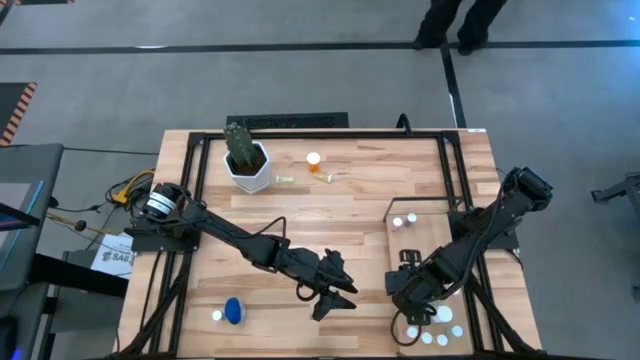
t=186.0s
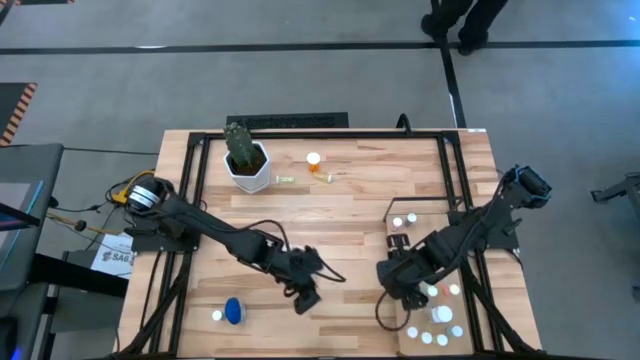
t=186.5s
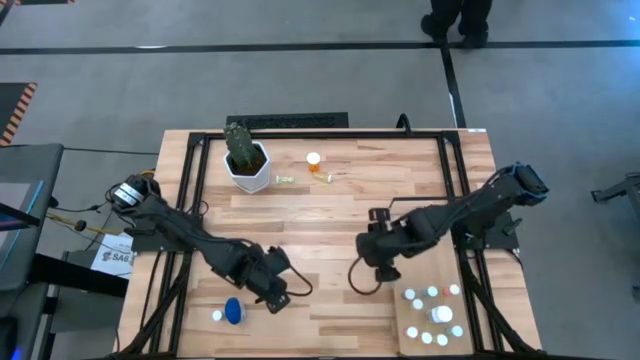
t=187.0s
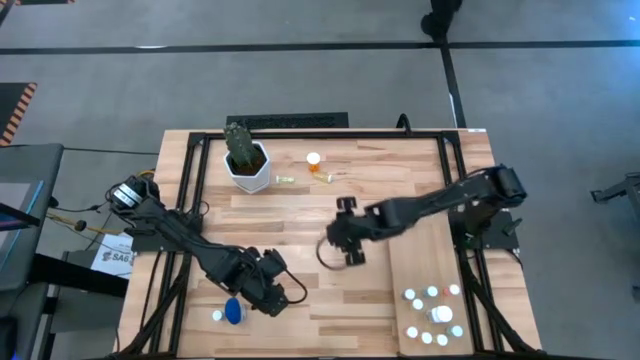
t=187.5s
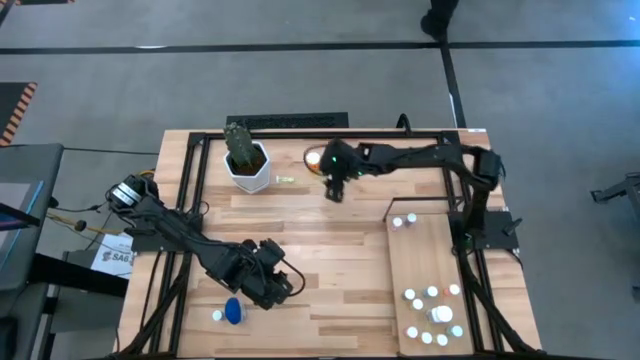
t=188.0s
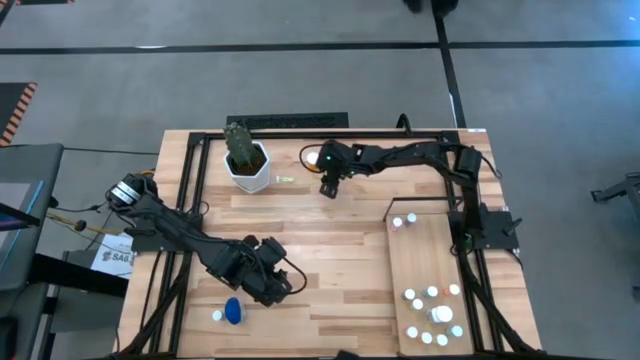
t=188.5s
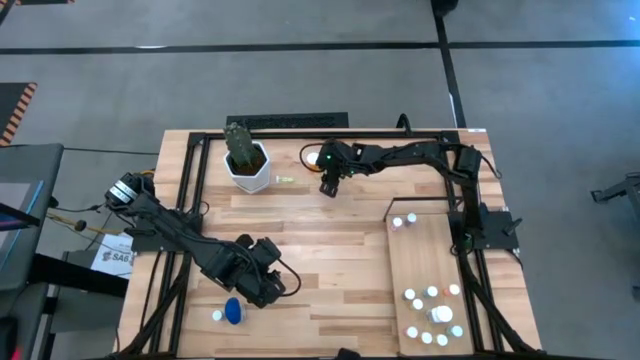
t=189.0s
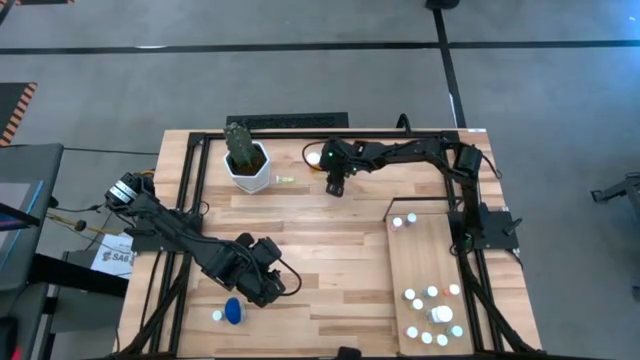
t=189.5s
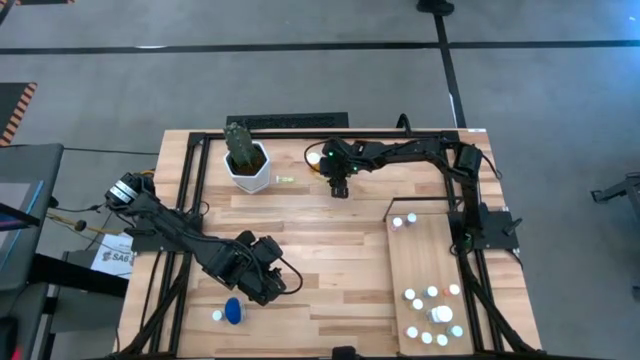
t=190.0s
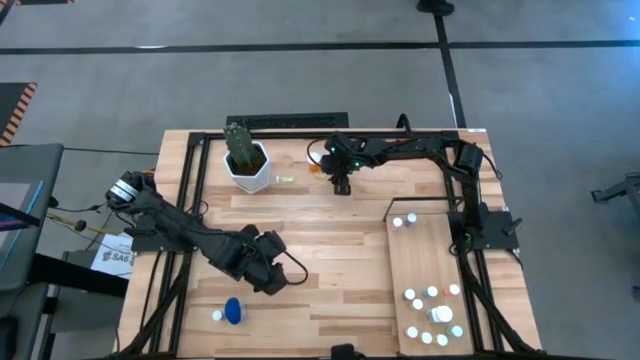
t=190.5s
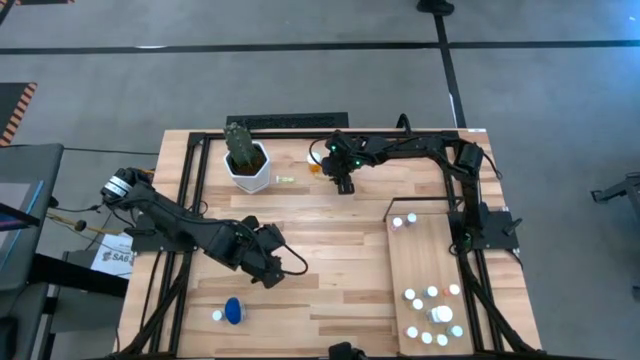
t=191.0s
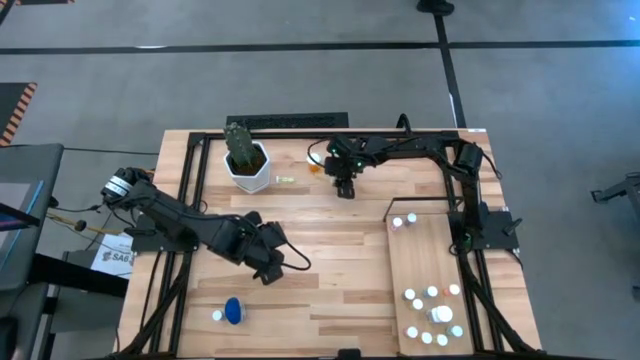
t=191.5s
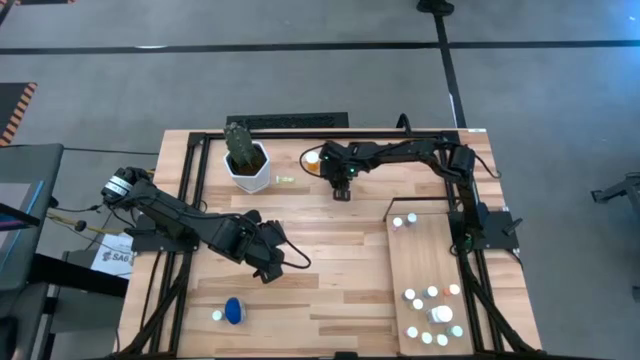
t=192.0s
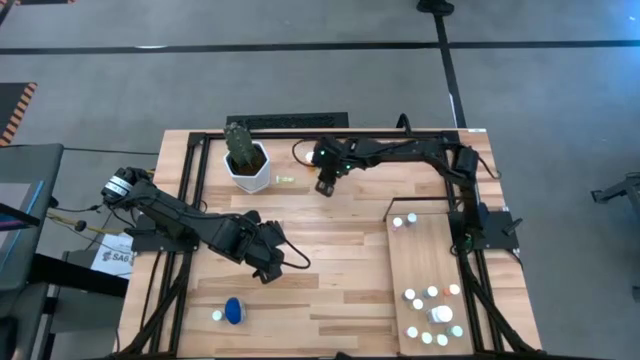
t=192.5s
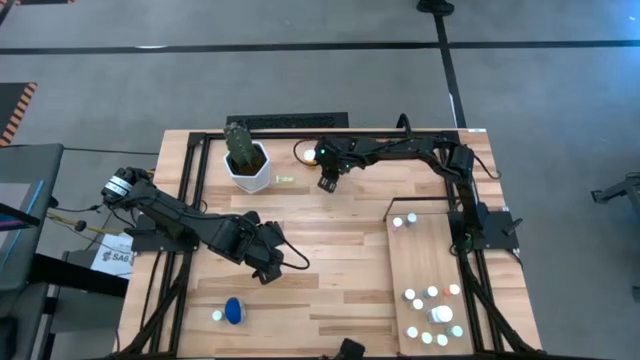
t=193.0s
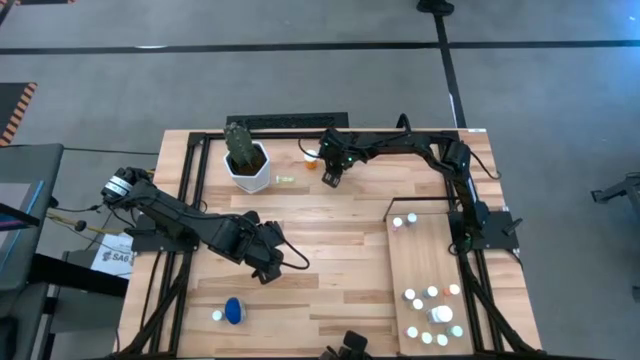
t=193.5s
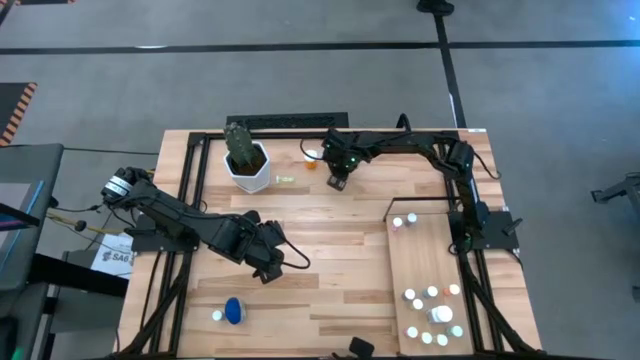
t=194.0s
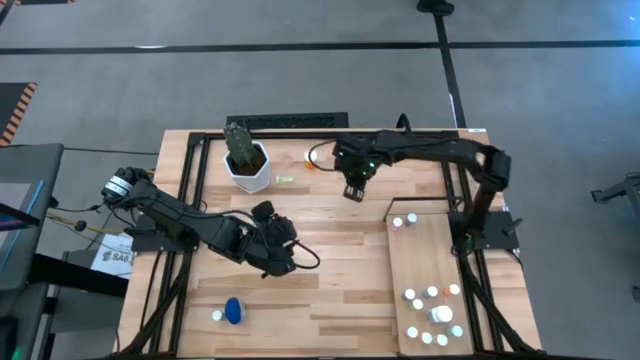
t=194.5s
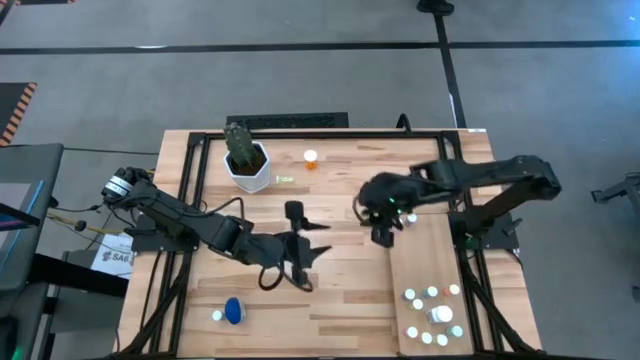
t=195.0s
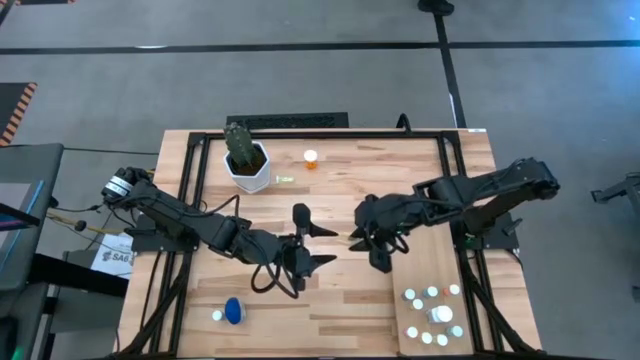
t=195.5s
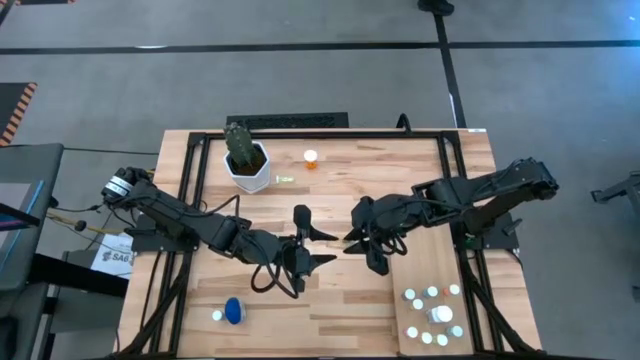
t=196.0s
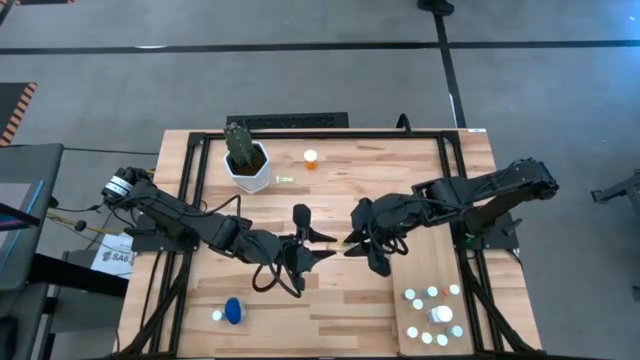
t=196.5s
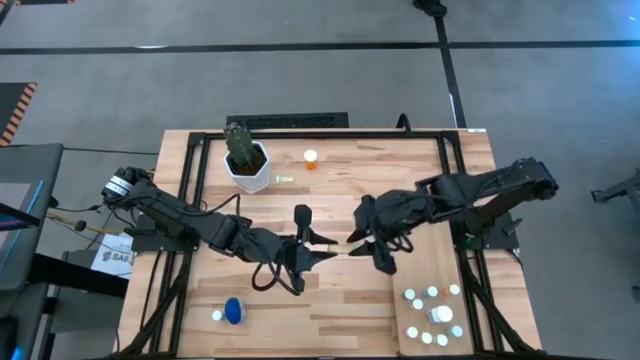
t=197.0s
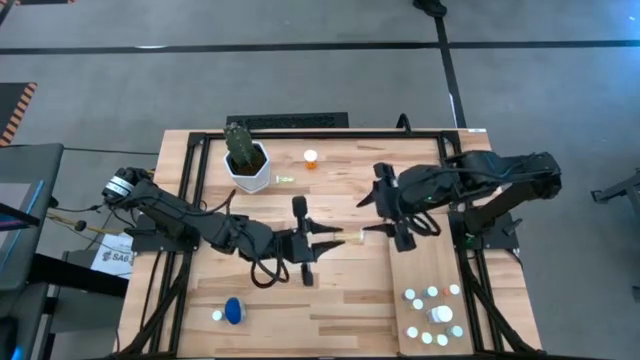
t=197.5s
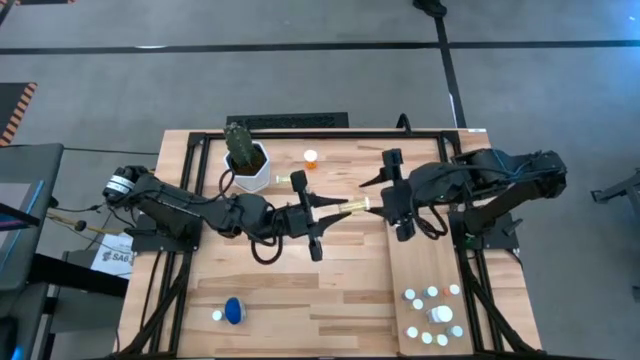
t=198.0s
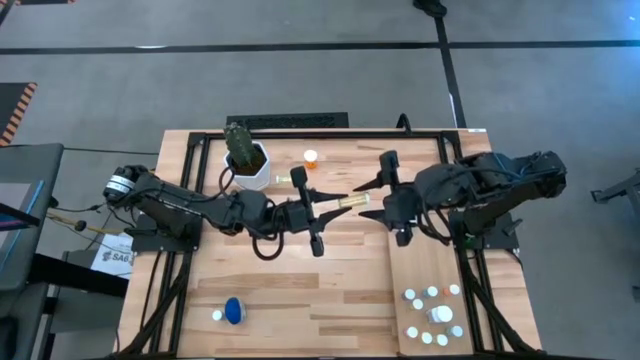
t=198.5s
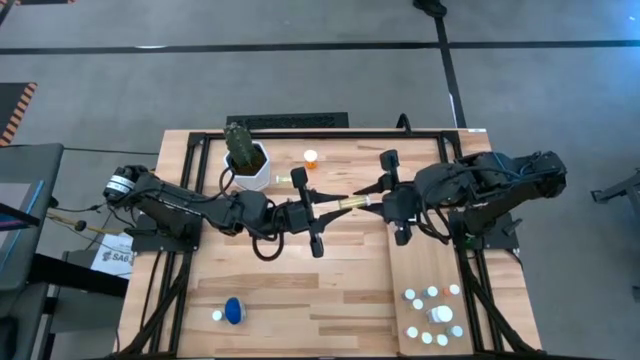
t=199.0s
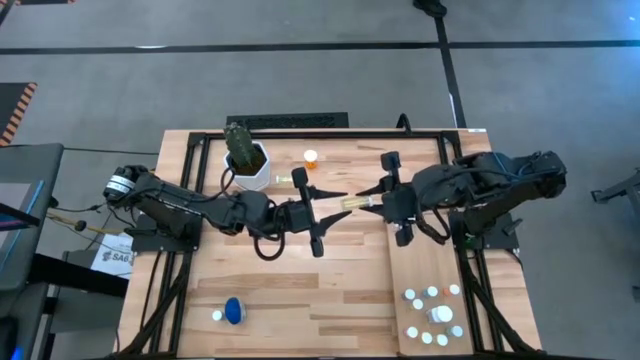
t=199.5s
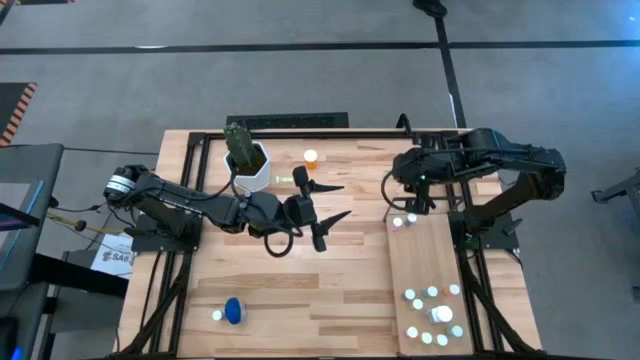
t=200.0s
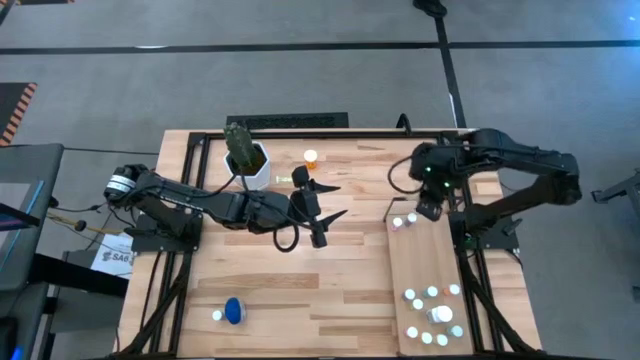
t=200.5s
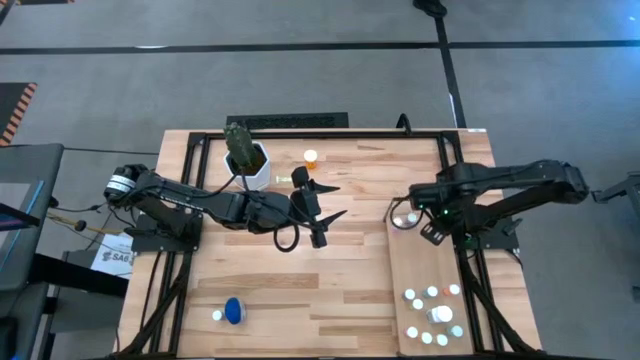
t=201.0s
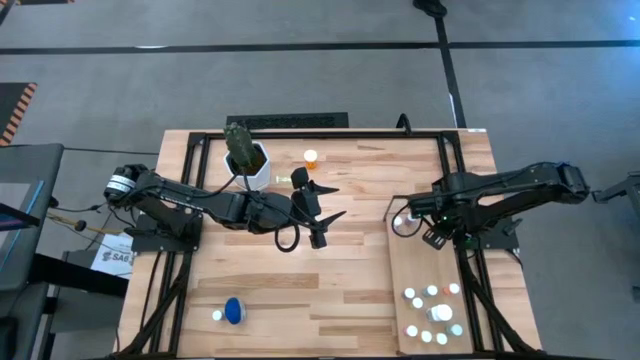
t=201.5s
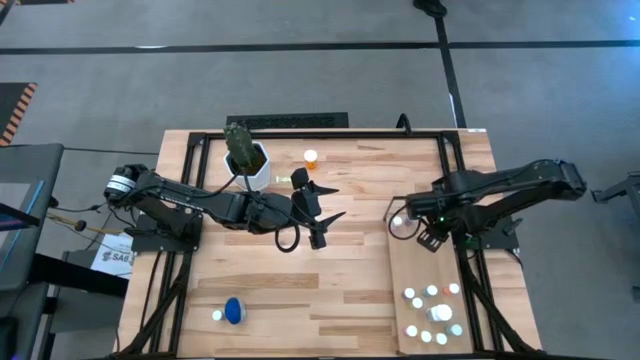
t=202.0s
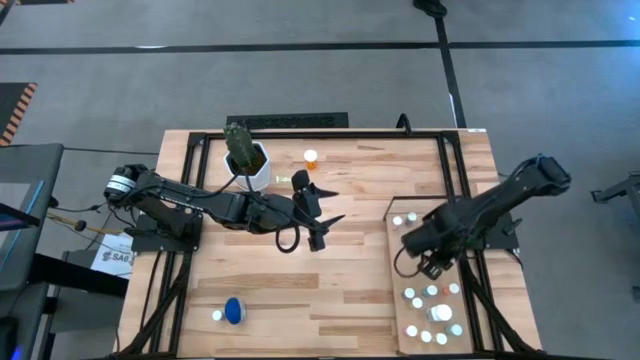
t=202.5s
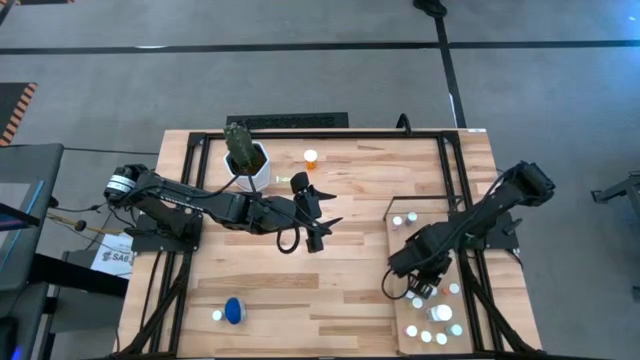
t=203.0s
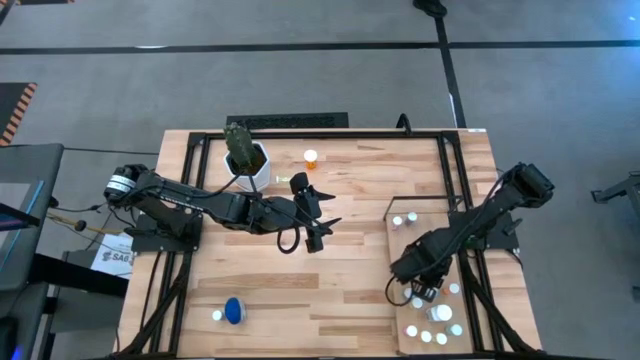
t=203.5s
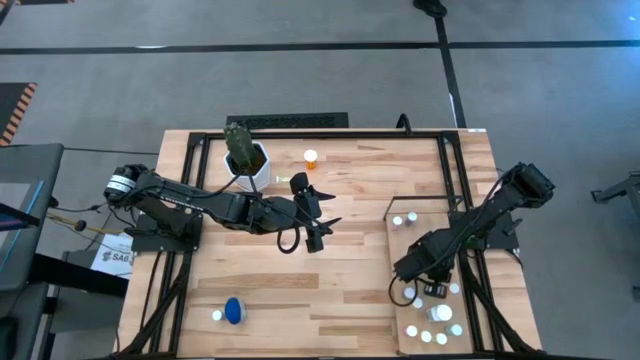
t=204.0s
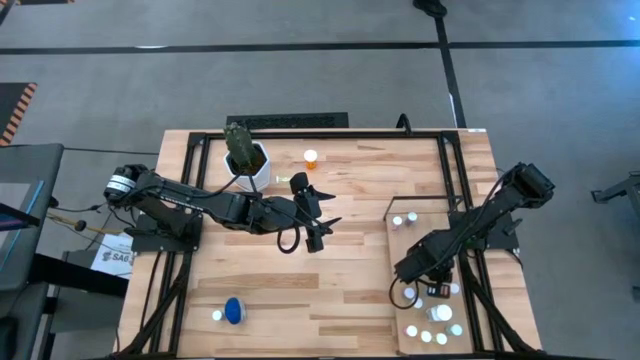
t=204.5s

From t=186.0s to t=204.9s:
Task: Pick and place medicine bottles onto shelf by color
Put the yellow pill bottle on the shelf

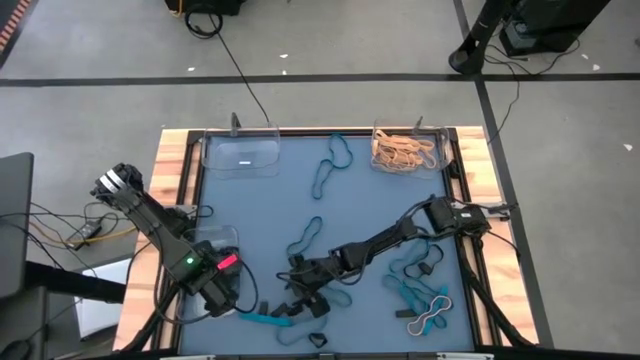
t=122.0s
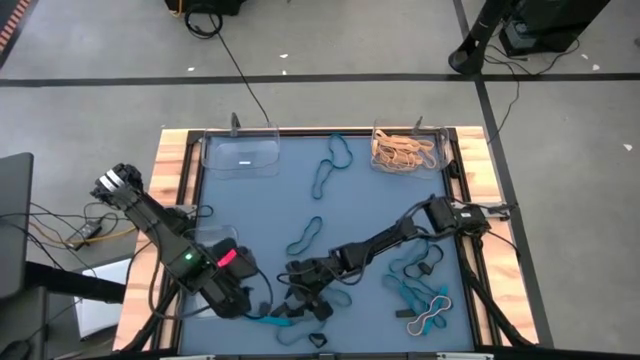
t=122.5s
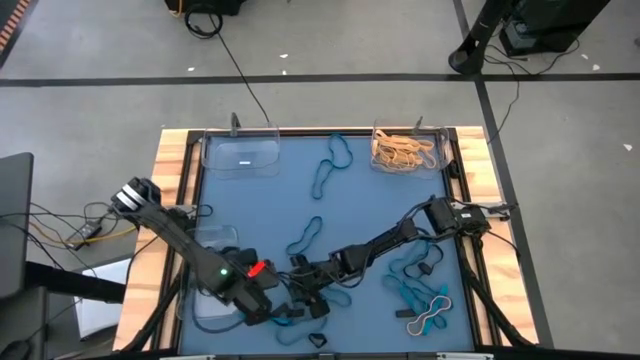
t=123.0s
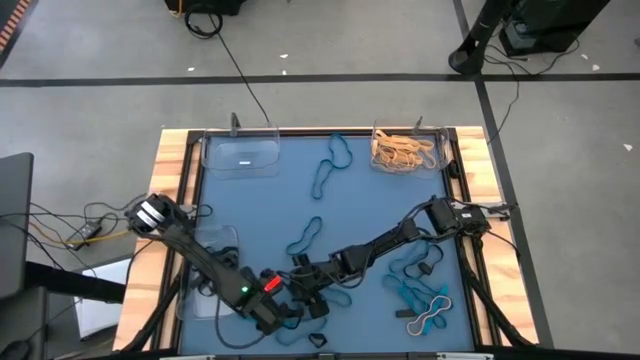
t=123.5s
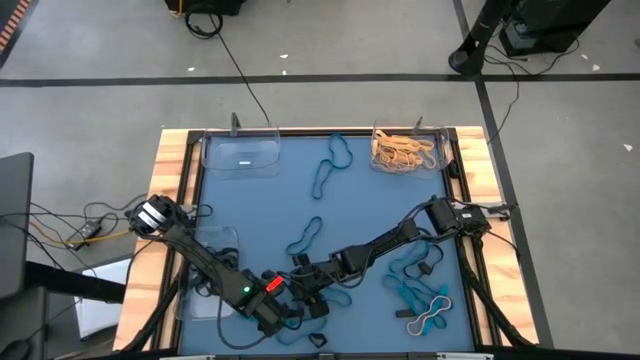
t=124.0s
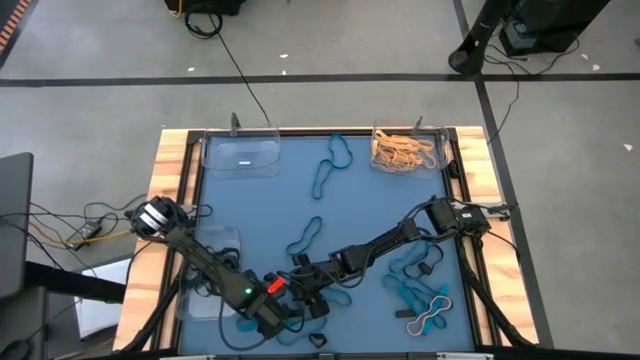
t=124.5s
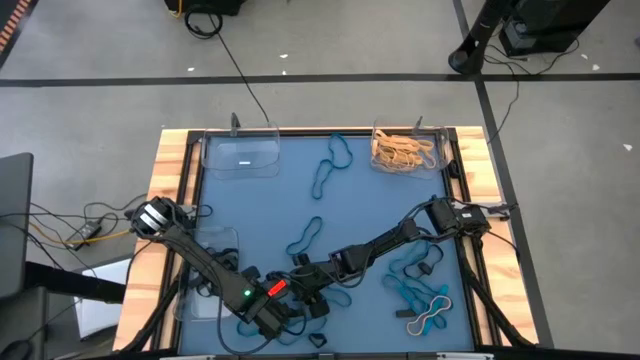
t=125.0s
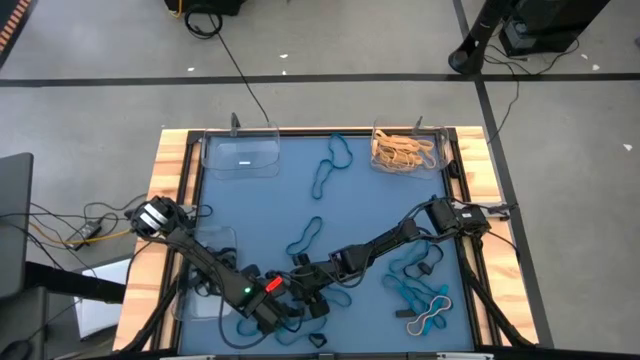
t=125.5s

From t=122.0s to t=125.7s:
Task: Sort rubber bands into baskets
Put the small black rubber band into the bottom left transparent bin
